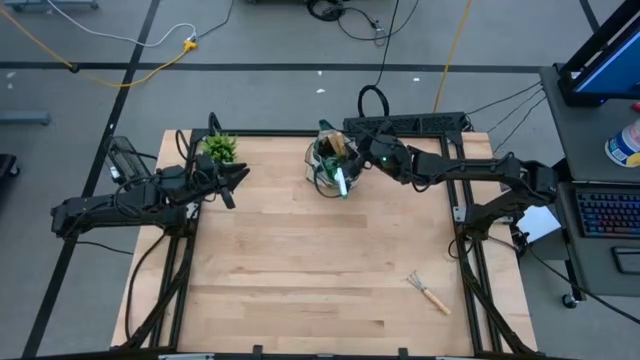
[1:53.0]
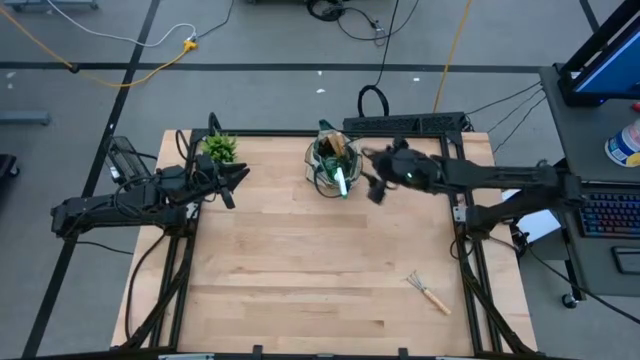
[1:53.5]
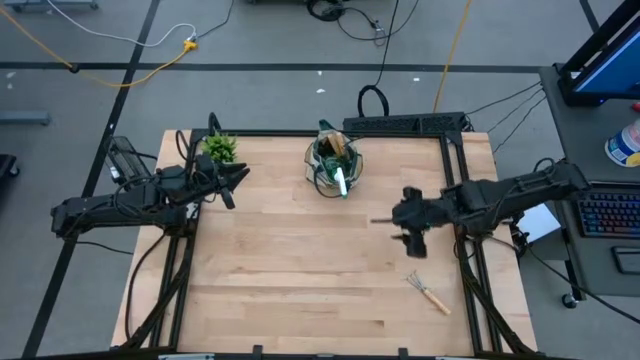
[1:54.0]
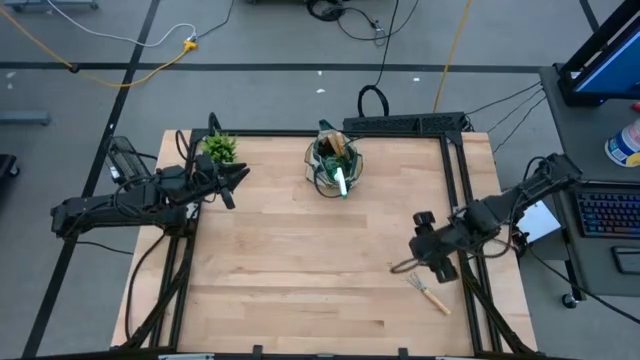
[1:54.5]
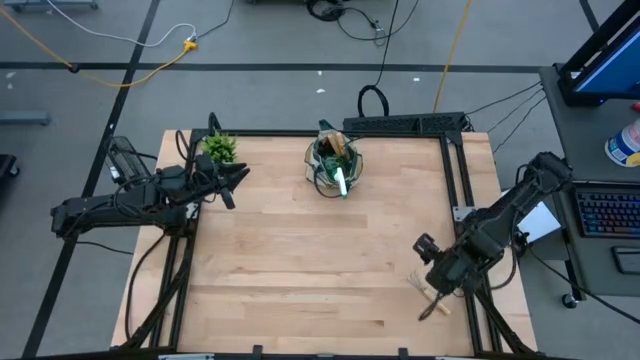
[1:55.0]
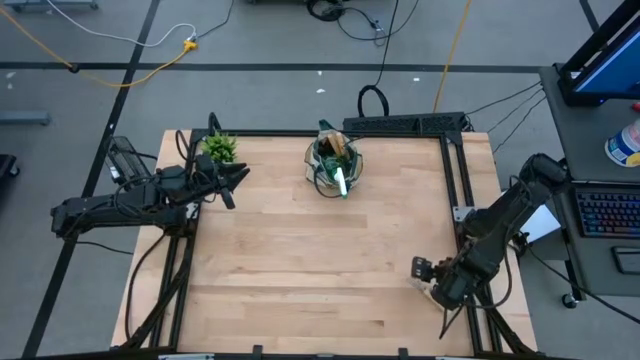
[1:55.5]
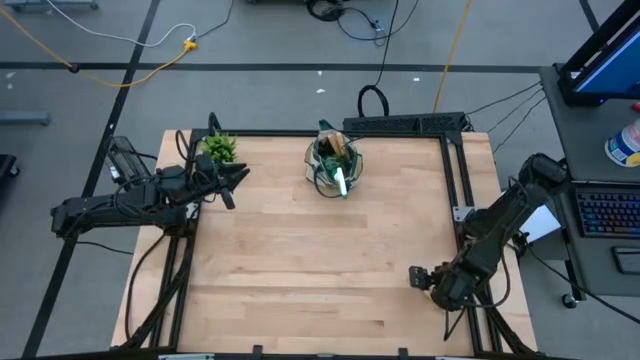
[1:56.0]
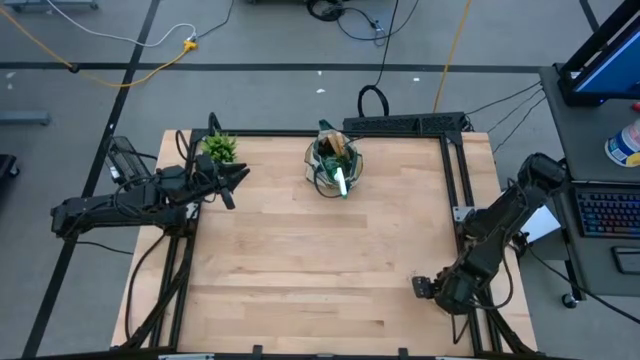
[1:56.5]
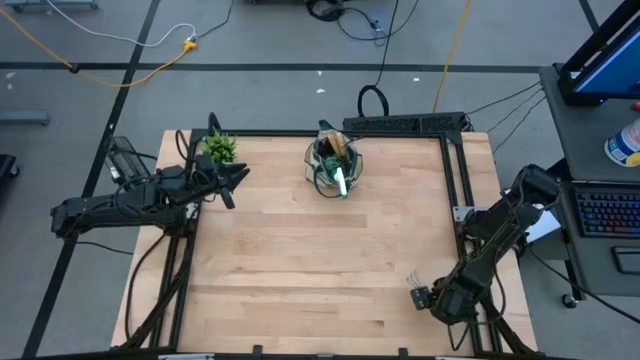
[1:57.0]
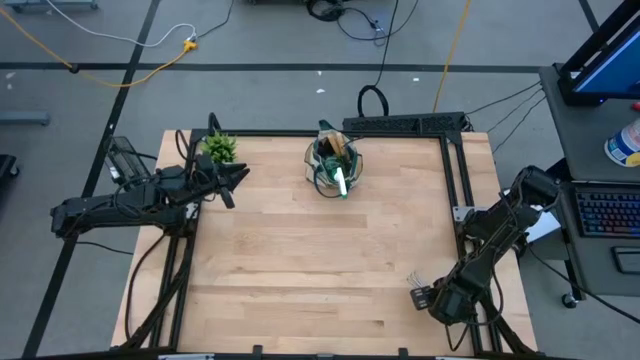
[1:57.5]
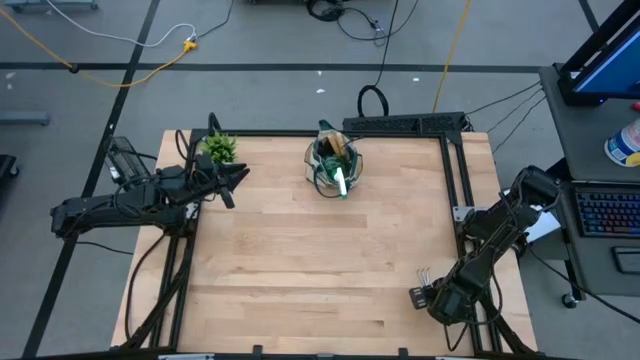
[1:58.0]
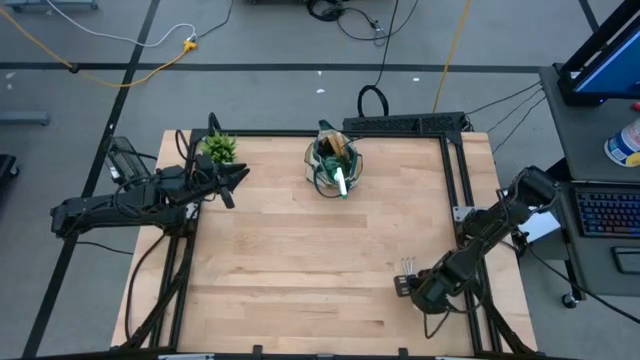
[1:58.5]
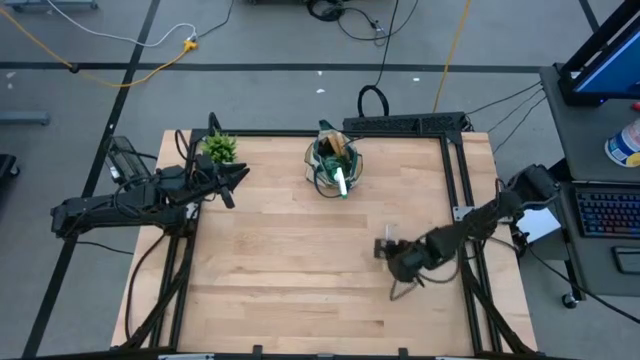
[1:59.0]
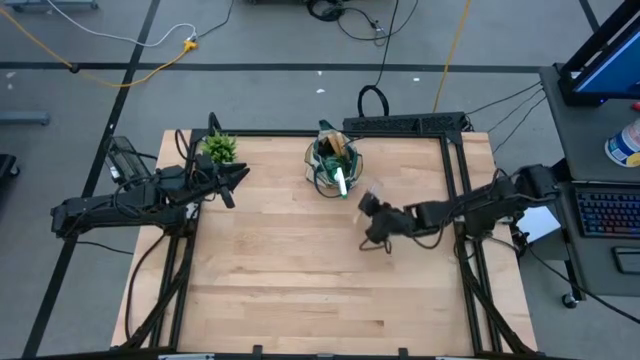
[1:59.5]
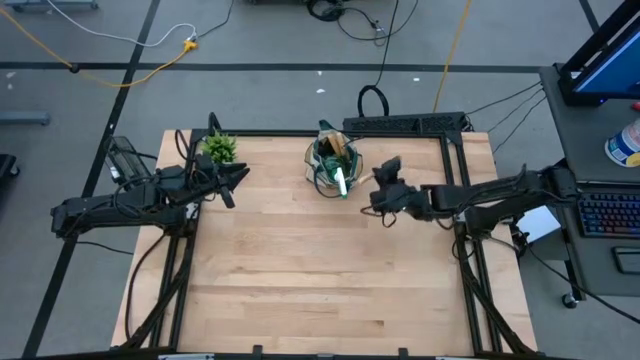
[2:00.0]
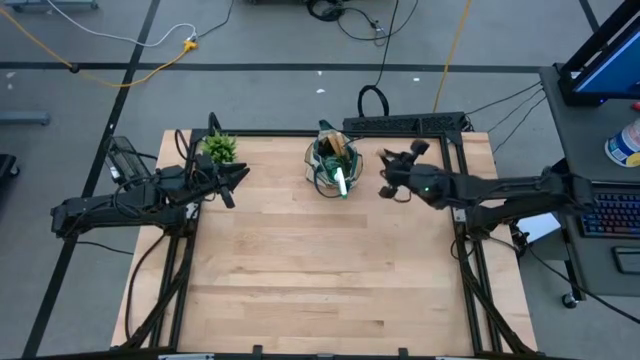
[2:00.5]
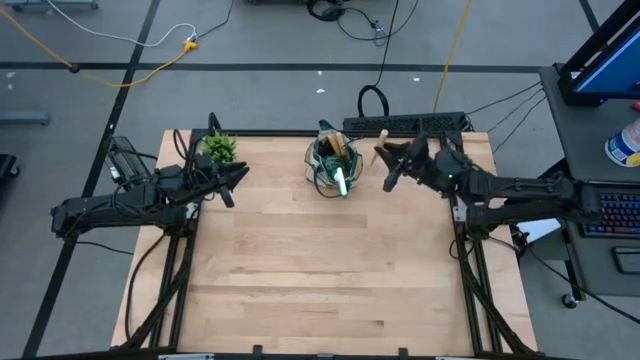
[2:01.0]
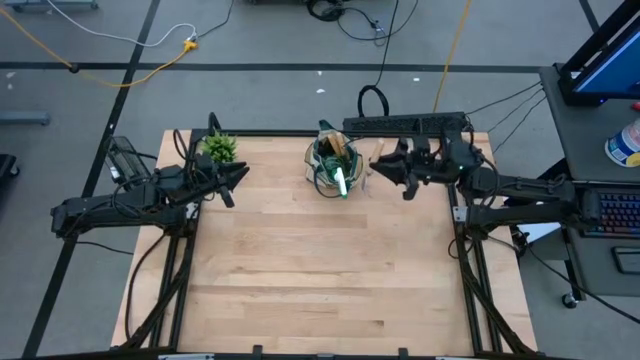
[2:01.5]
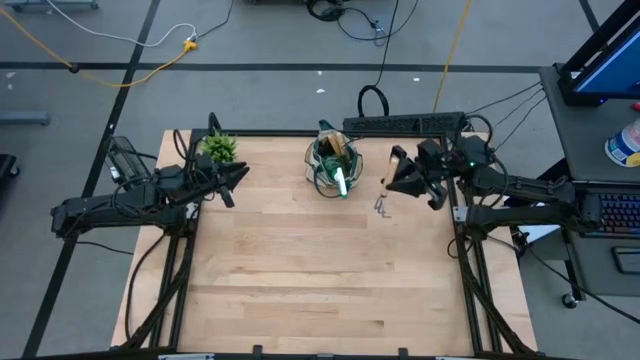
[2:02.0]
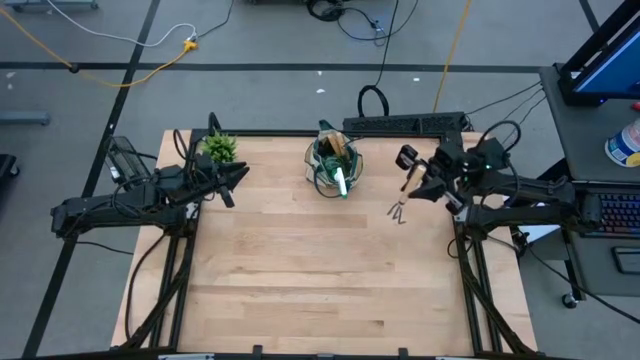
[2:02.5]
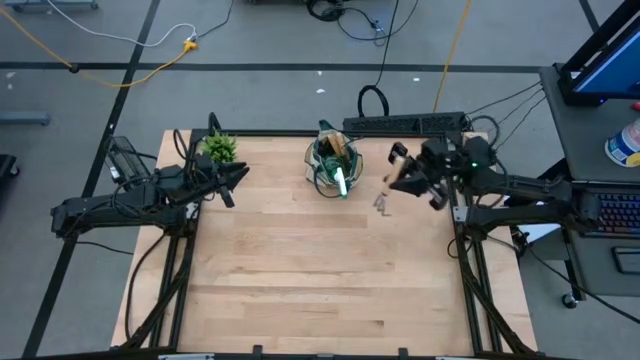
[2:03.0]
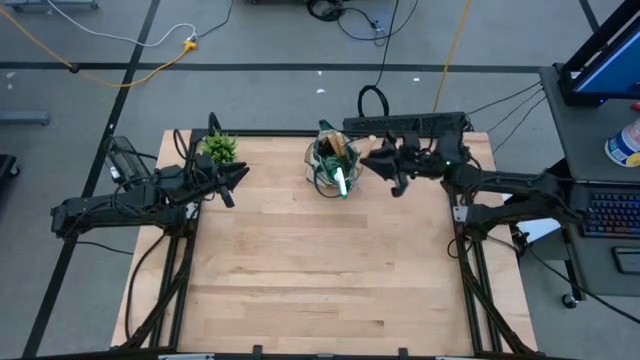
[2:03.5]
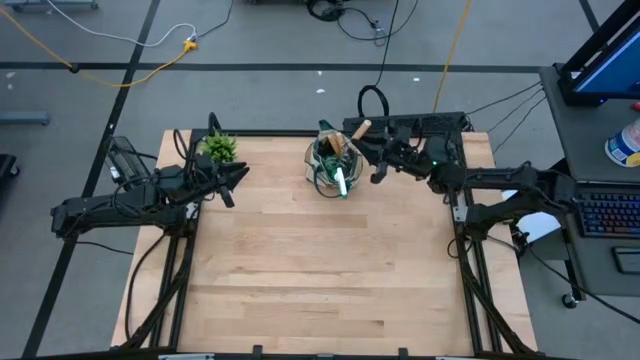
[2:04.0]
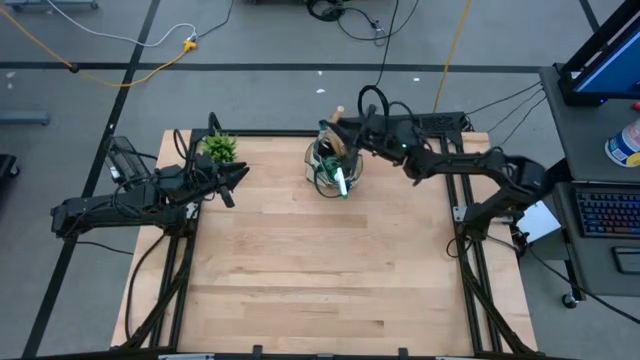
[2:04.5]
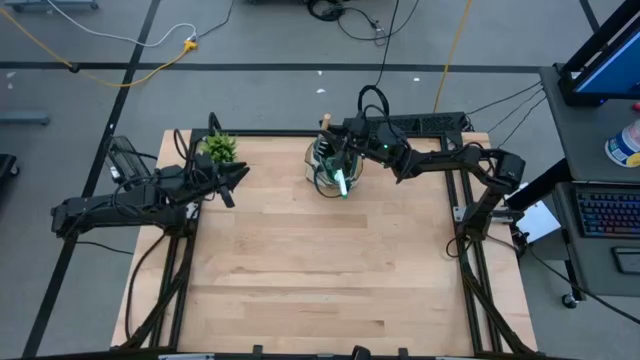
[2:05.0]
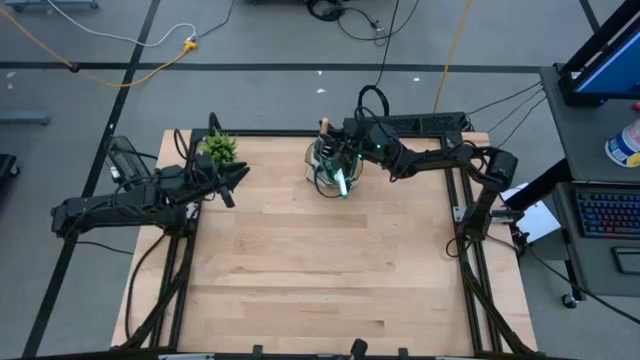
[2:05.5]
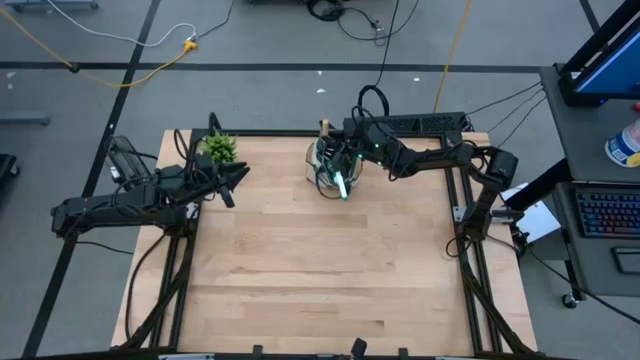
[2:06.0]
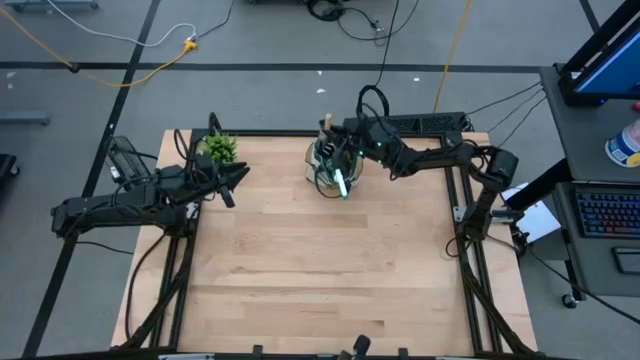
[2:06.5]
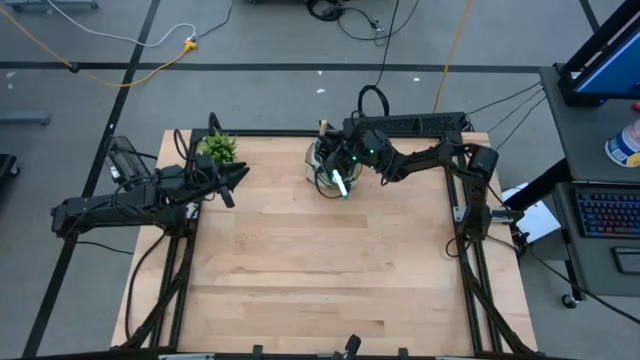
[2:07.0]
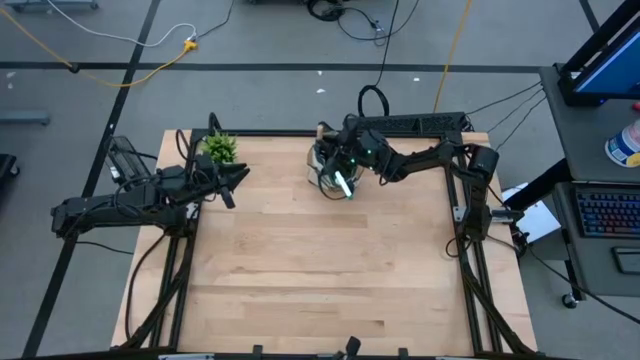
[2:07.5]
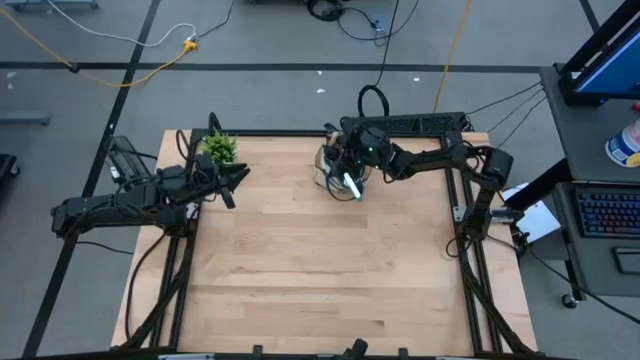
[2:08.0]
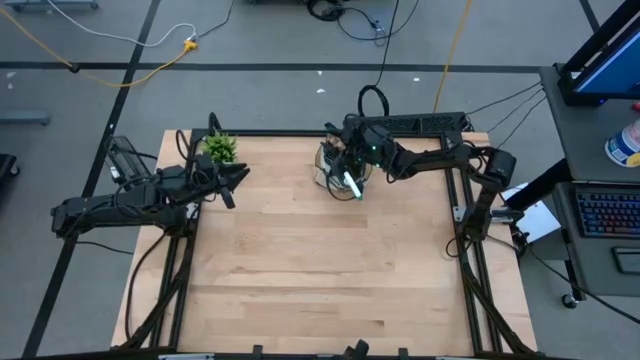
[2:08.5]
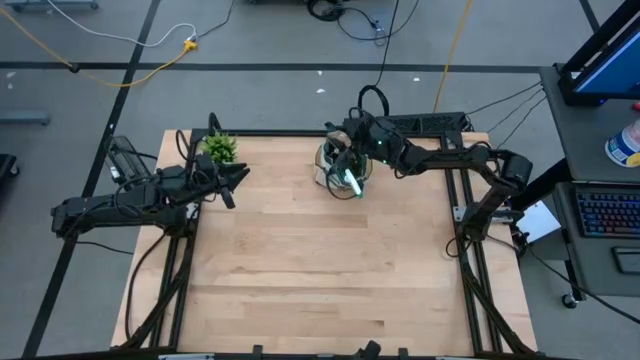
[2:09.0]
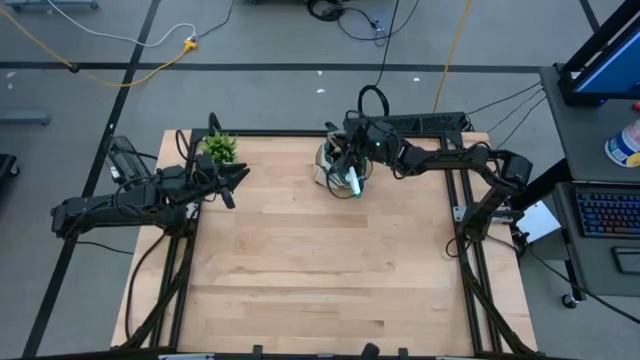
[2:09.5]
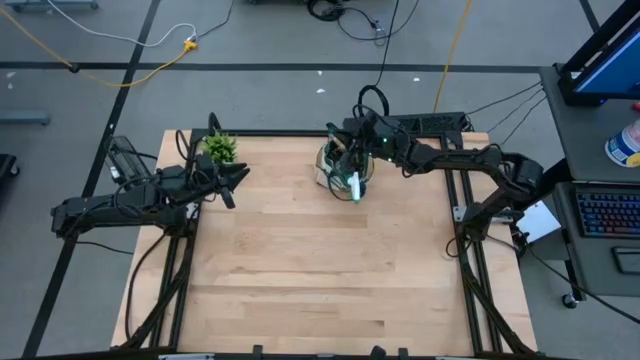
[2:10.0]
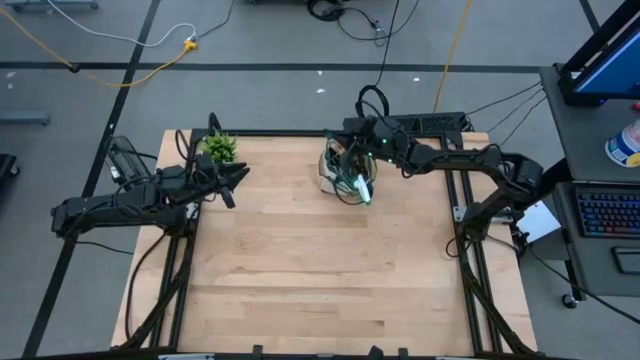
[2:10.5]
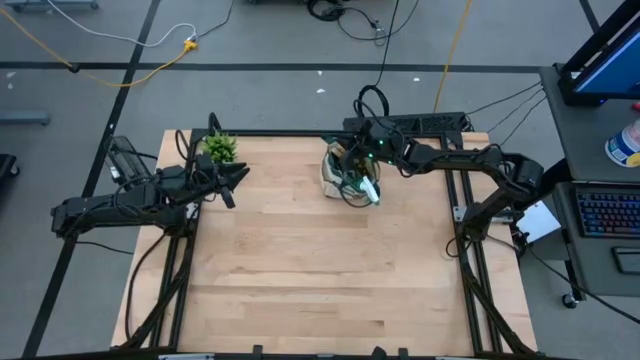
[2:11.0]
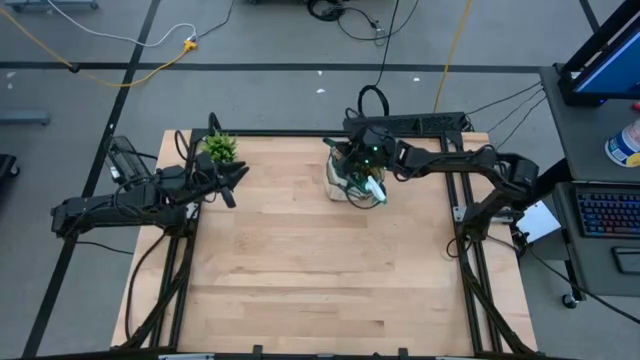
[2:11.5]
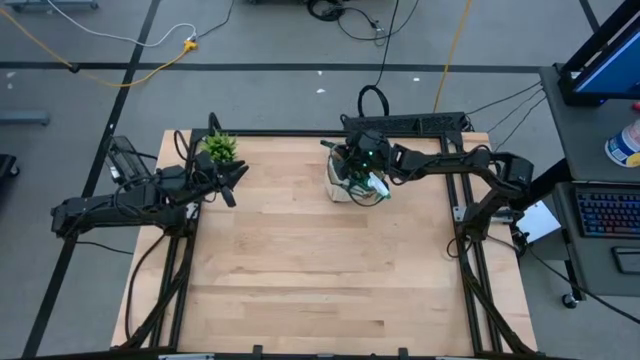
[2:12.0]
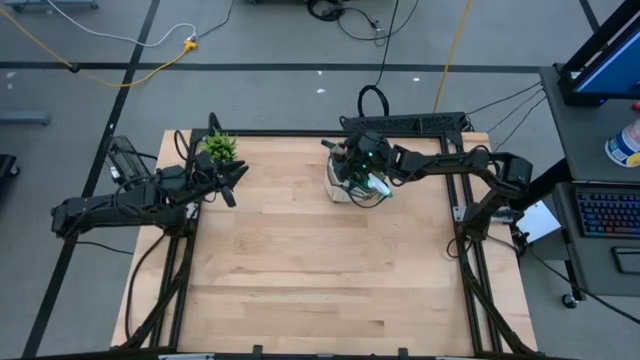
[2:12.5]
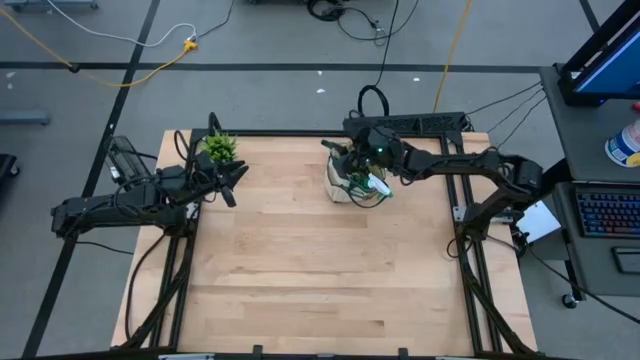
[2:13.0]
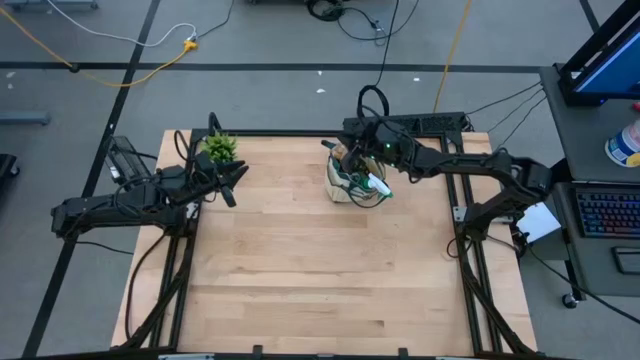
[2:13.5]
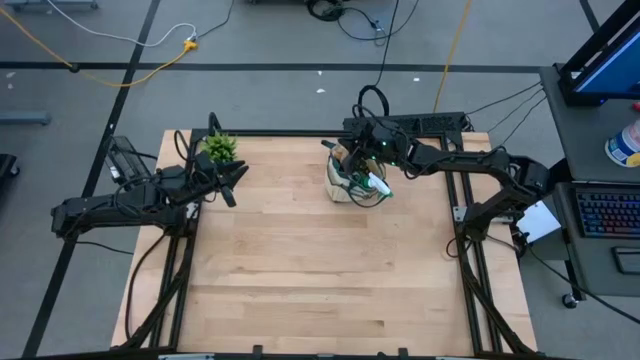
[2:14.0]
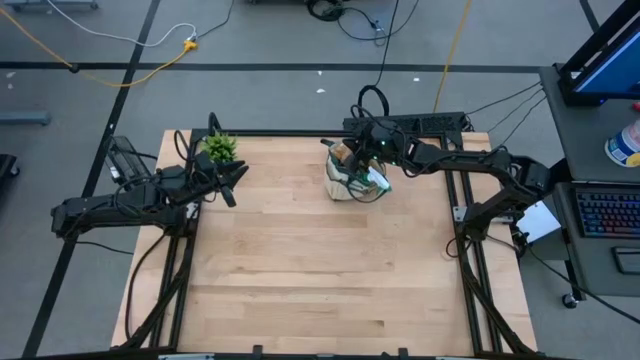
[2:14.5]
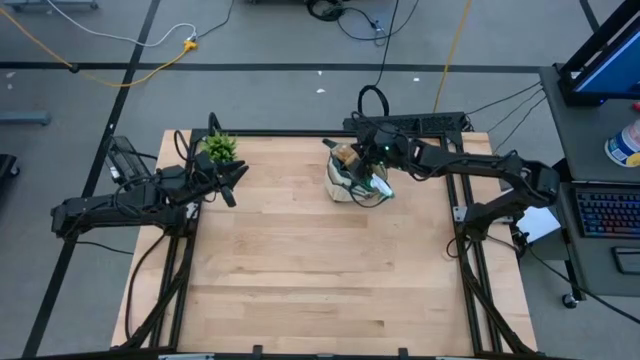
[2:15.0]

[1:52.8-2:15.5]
Task: Pick & Place Garden tools in Gardening bag
Put the brown hand rake into the gardening bag
